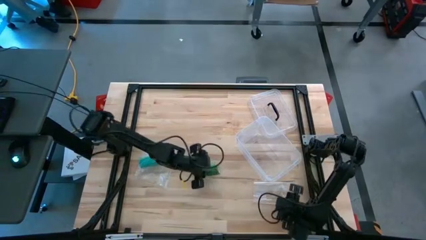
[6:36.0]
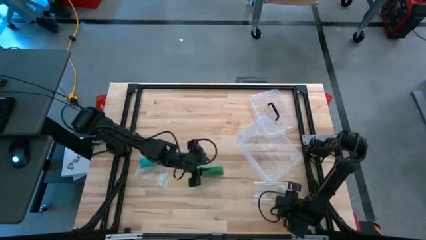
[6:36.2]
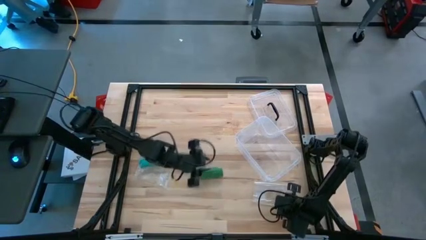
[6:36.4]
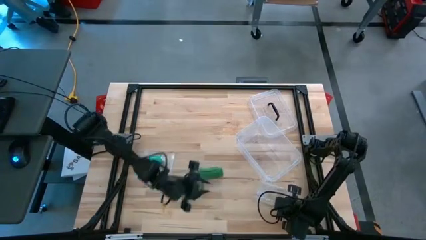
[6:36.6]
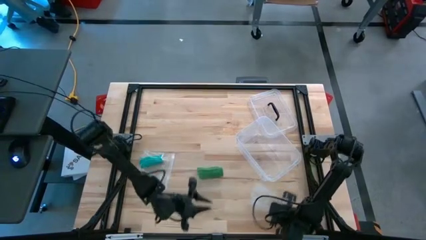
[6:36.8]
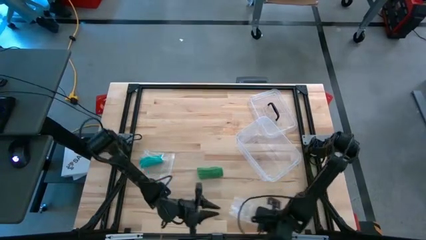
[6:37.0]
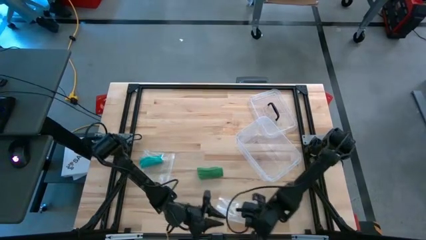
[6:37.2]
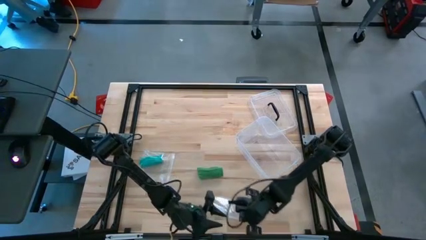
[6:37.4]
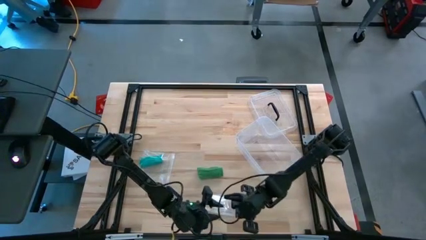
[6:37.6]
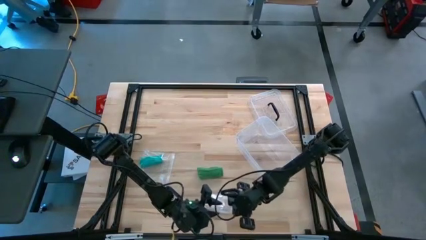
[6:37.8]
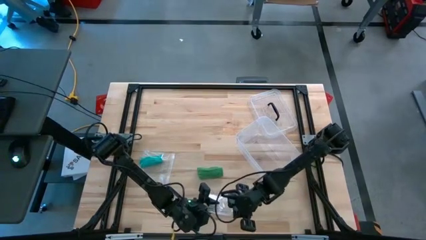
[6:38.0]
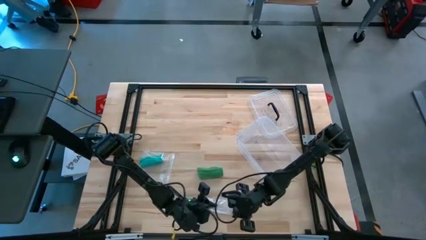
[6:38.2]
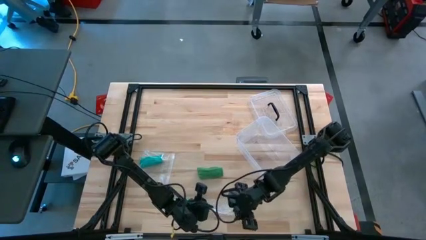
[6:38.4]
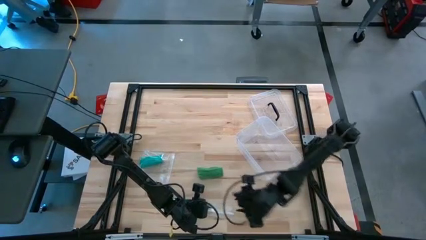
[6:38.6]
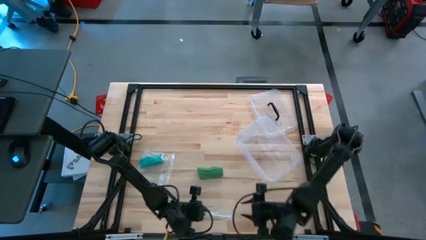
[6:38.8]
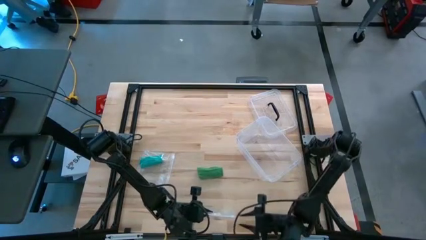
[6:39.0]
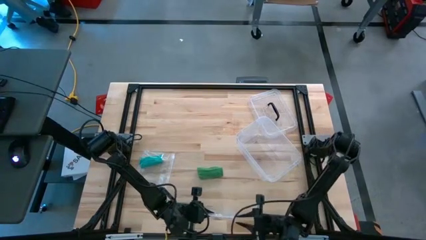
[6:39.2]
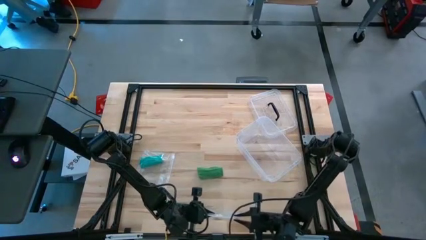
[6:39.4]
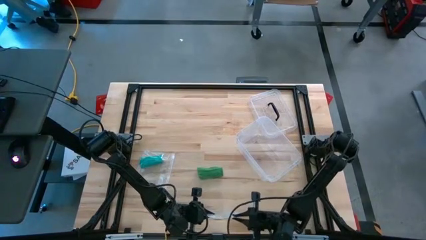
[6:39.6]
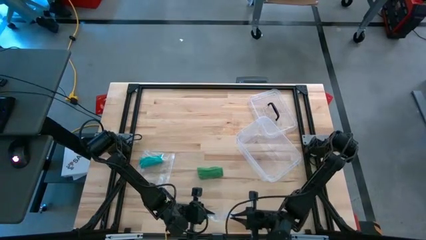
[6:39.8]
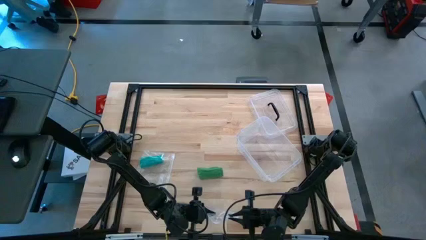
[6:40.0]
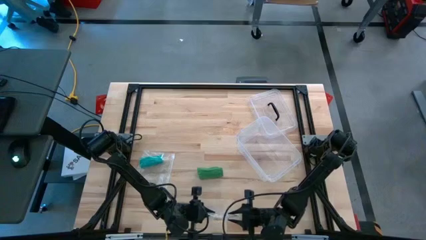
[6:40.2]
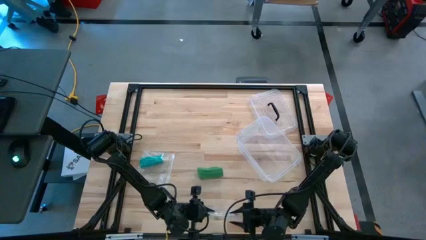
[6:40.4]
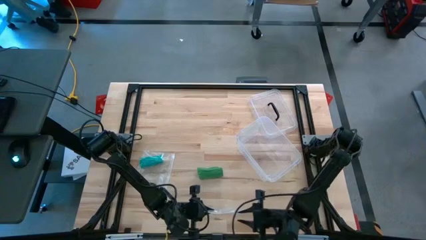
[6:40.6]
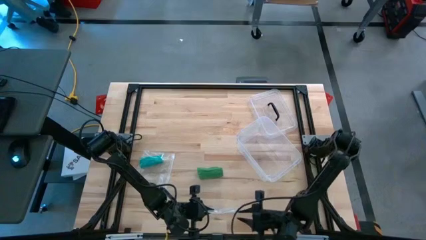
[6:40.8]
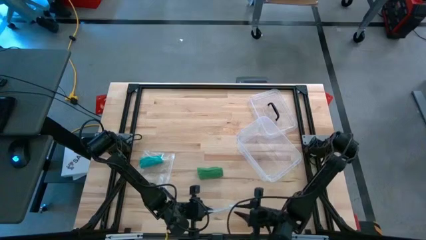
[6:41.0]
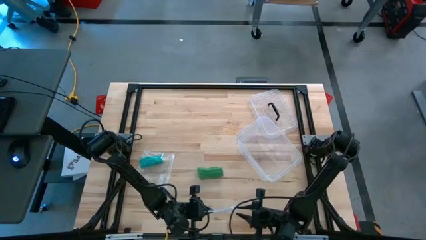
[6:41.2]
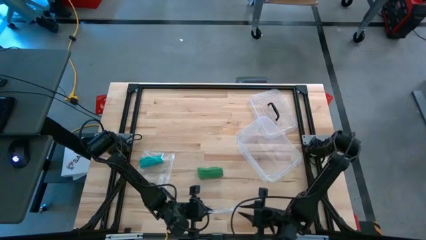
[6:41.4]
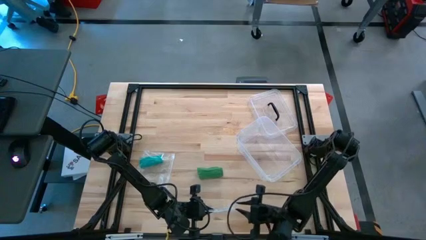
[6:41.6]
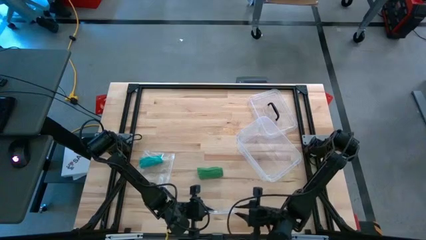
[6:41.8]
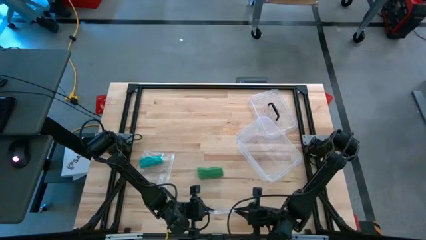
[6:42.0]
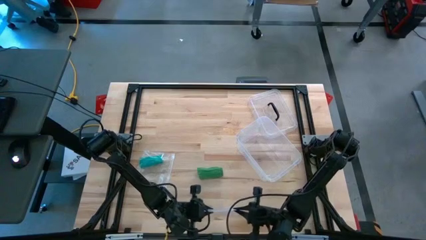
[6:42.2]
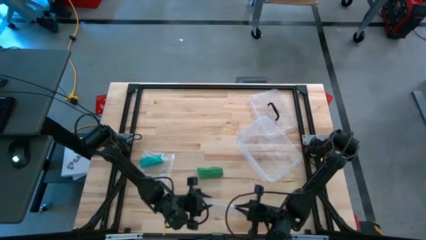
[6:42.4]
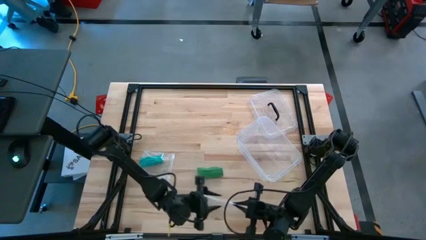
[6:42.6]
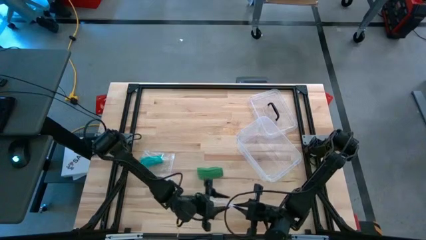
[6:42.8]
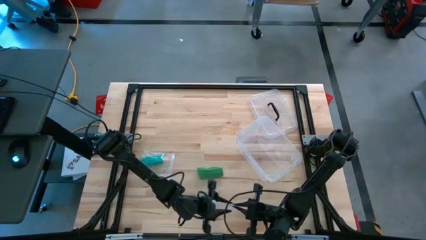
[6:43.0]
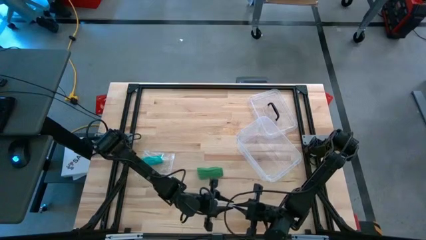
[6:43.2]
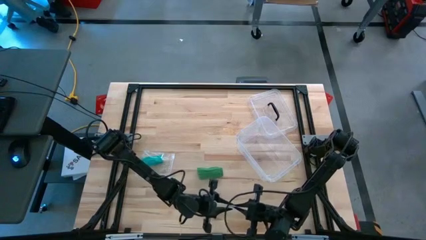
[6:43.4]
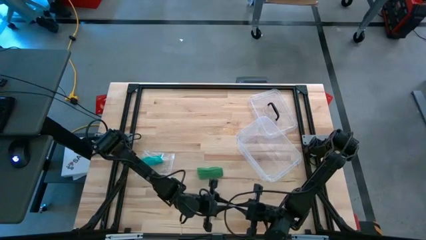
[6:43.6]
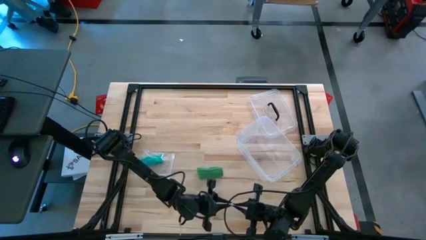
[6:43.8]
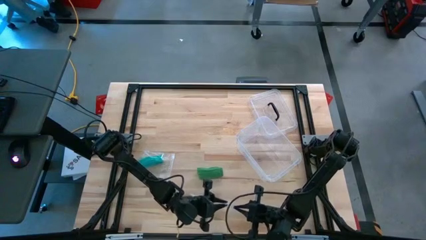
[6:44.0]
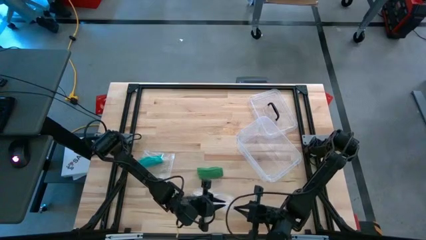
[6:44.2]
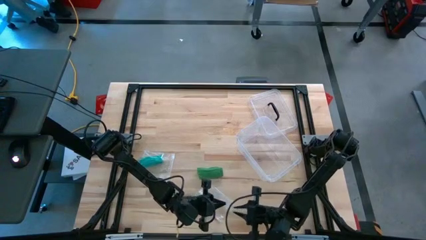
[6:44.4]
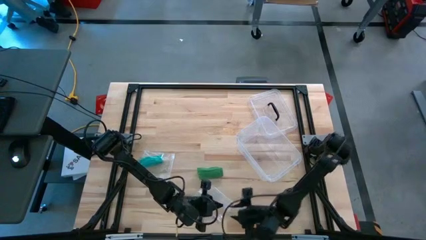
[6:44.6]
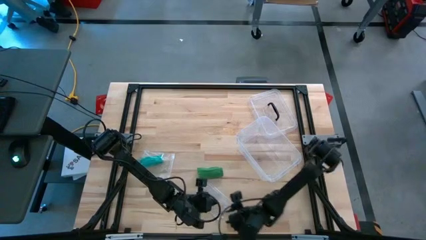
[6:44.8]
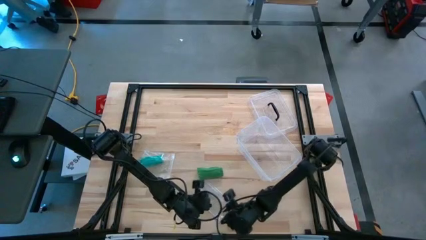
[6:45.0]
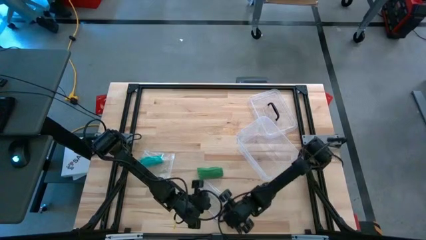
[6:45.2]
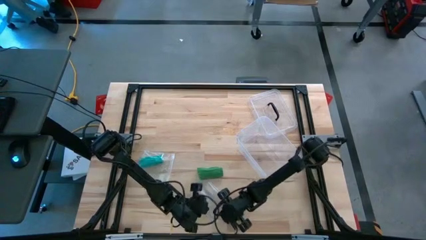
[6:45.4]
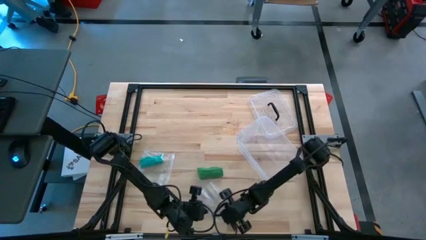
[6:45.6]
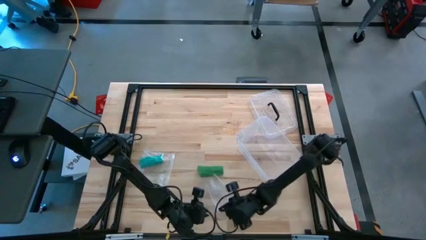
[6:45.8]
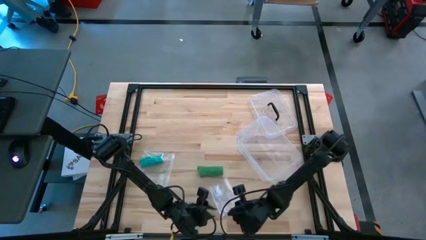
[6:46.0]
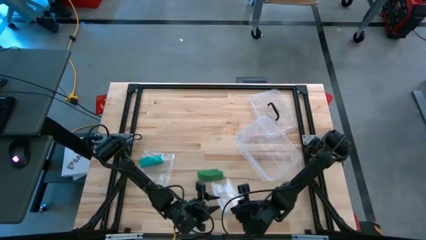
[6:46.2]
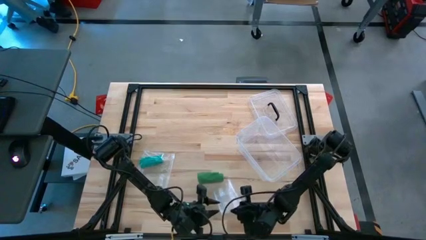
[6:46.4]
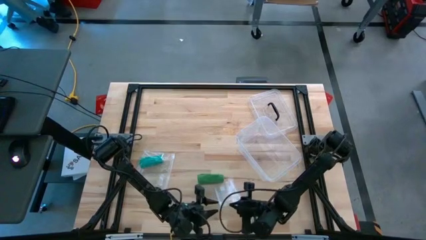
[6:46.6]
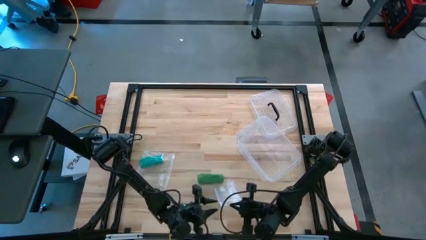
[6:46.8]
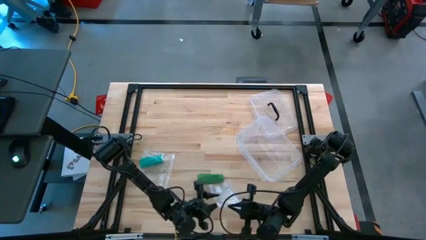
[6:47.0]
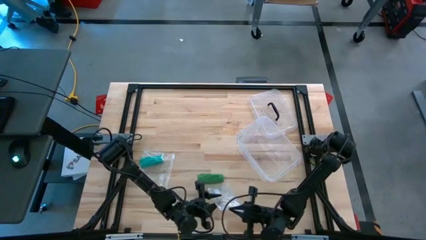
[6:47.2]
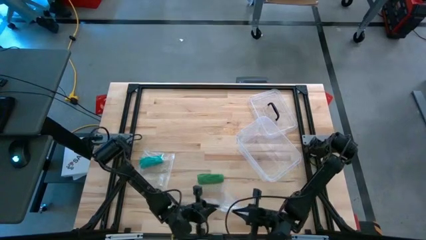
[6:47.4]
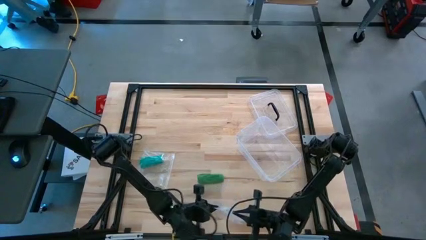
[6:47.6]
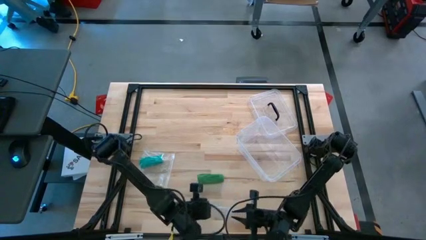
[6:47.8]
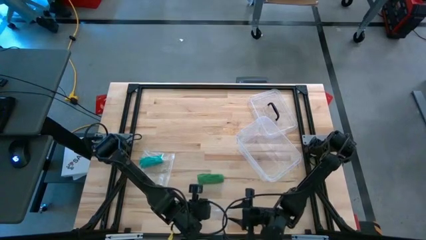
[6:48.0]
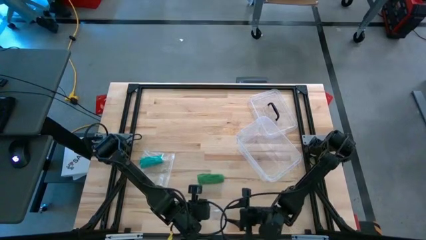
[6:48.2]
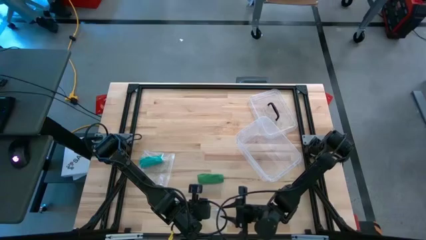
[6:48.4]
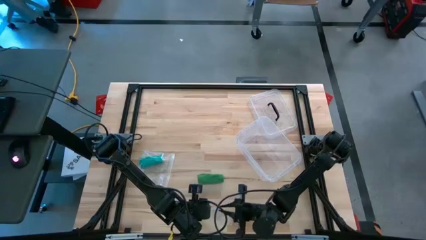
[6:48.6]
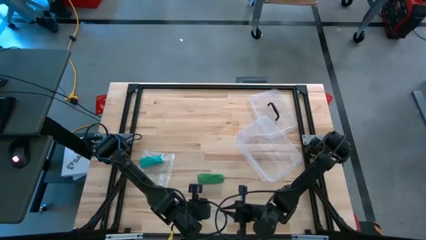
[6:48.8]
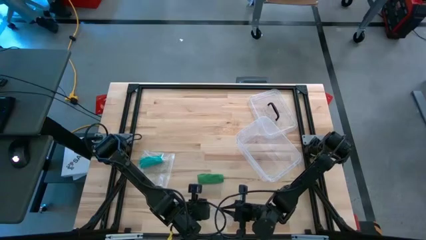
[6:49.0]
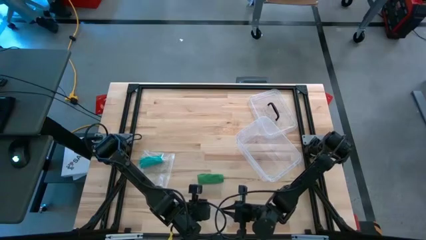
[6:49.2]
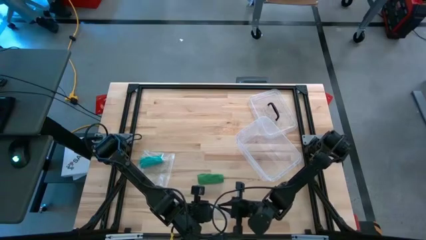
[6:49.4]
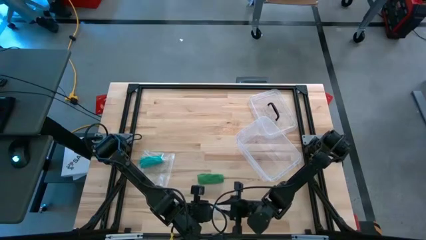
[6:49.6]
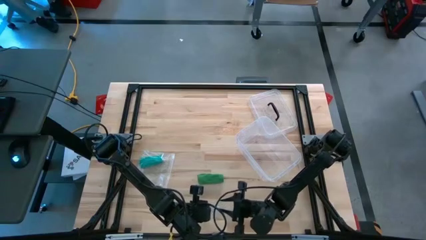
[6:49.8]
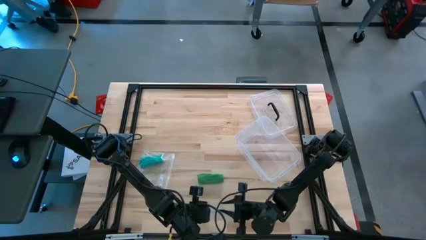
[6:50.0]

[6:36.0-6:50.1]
Task: Roll bandage
Open the transparent zip bag

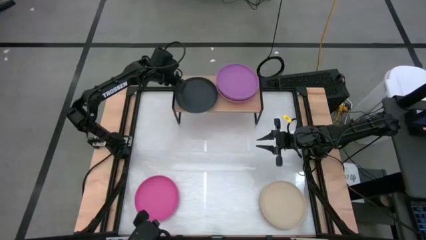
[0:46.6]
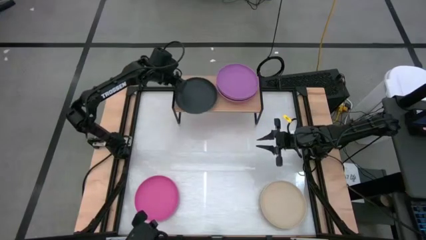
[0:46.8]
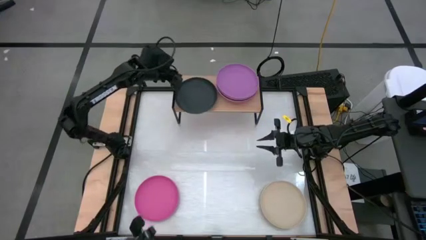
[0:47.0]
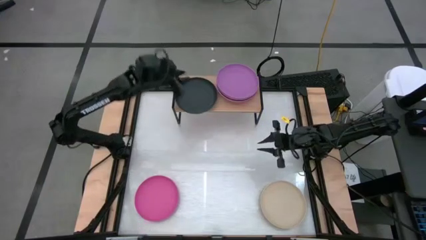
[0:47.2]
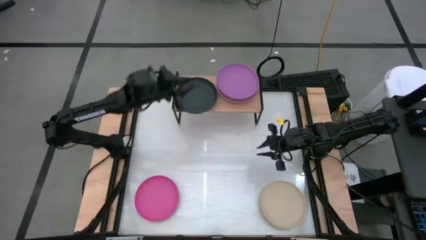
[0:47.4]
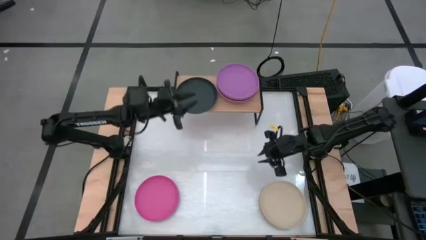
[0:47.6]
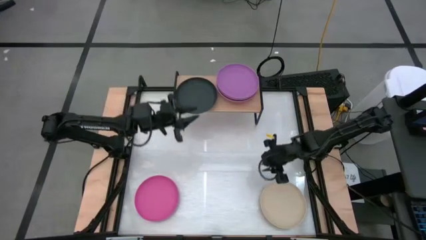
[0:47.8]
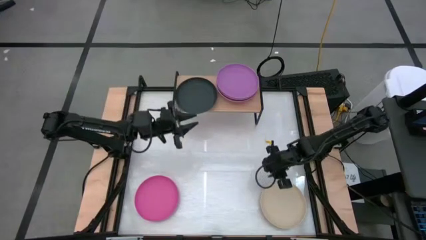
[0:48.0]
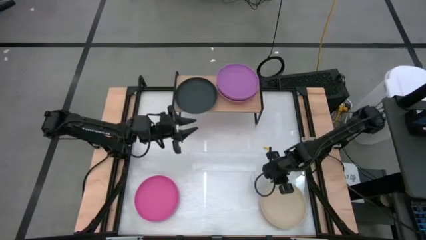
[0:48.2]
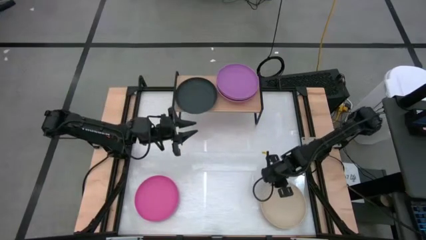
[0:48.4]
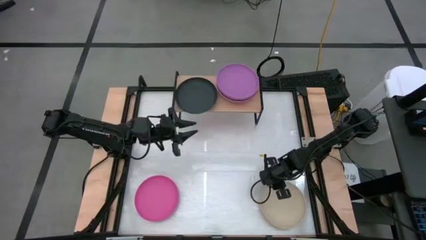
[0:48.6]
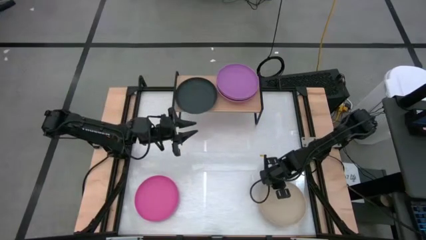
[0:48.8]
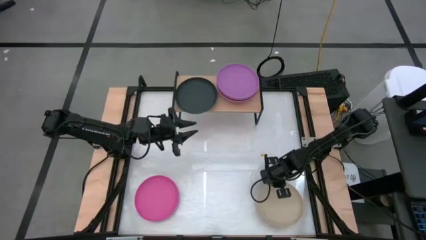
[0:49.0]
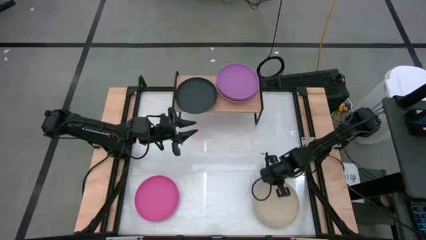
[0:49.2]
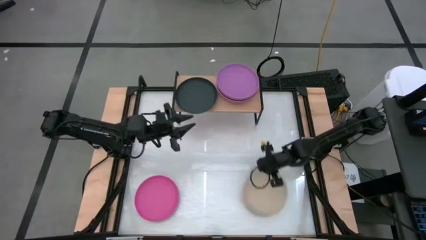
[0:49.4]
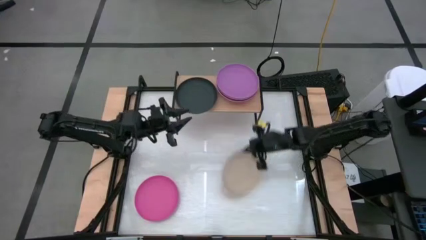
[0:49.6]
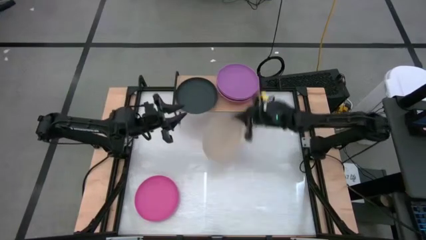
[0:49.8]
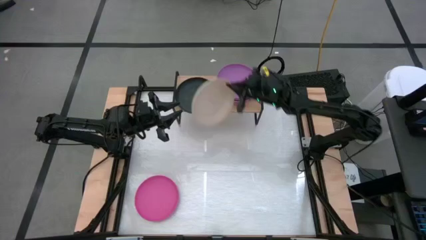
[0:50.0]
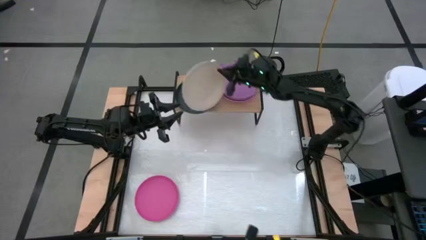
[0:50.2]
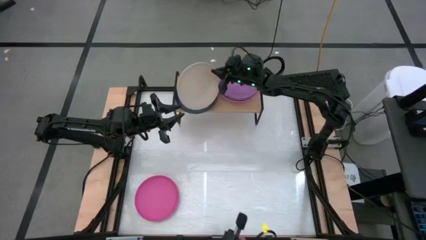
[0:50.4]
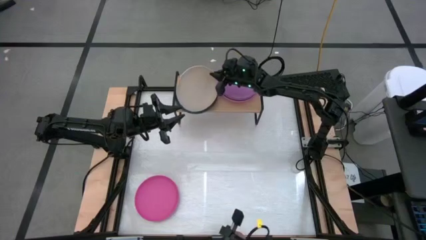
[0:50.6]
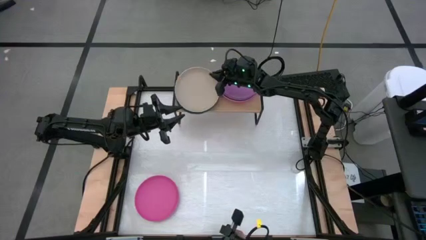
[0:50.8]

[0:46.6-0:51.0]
Task: Place and stack plates onto a shelf
Stack the light brown plate on top of the black plate on the shelf
